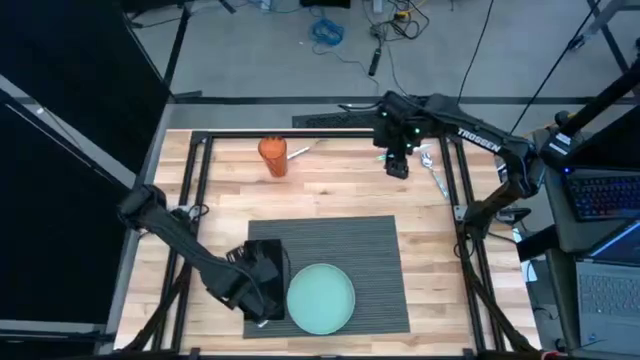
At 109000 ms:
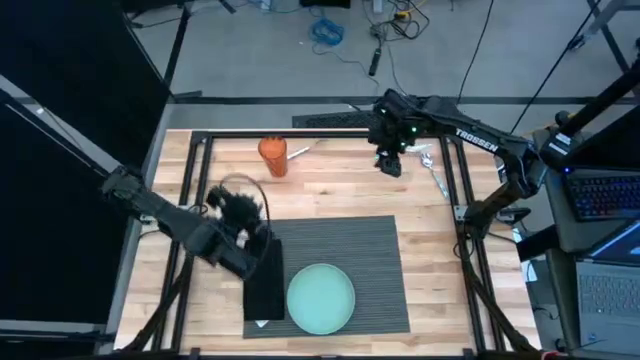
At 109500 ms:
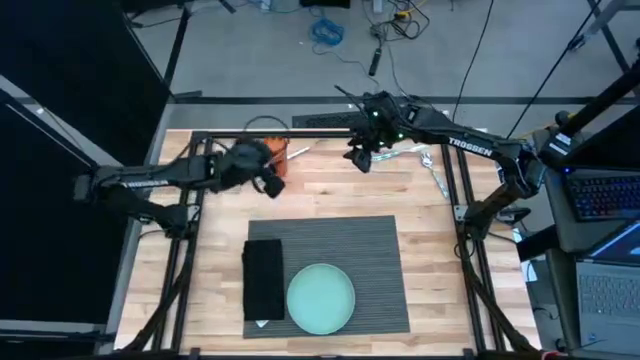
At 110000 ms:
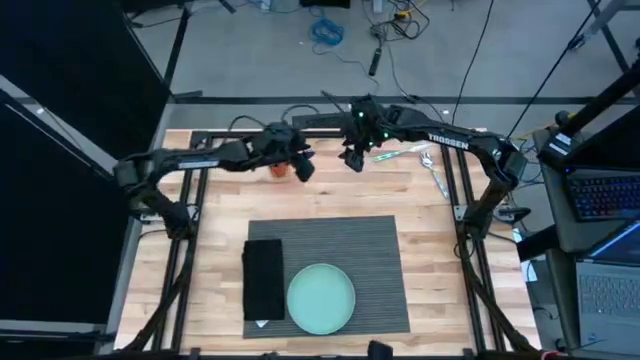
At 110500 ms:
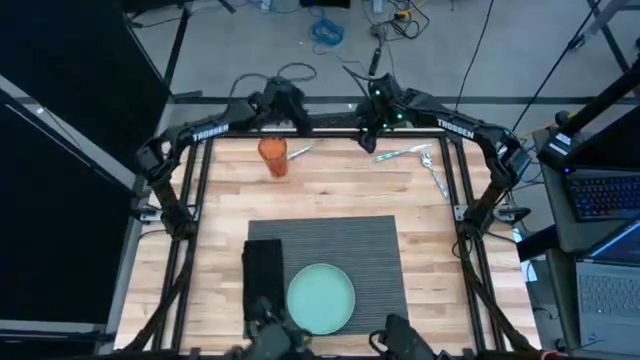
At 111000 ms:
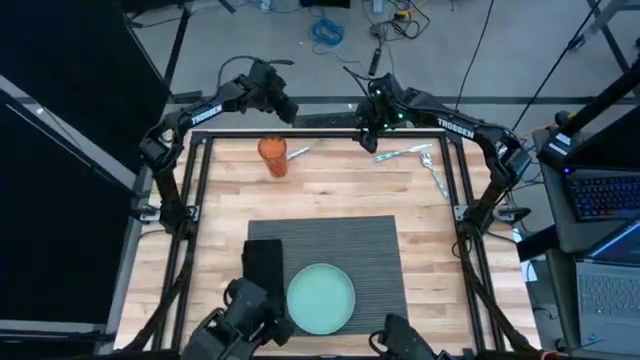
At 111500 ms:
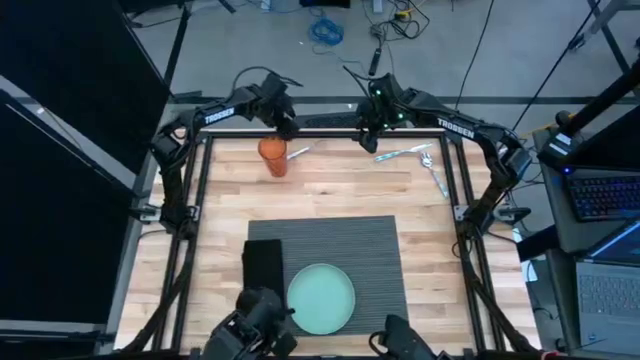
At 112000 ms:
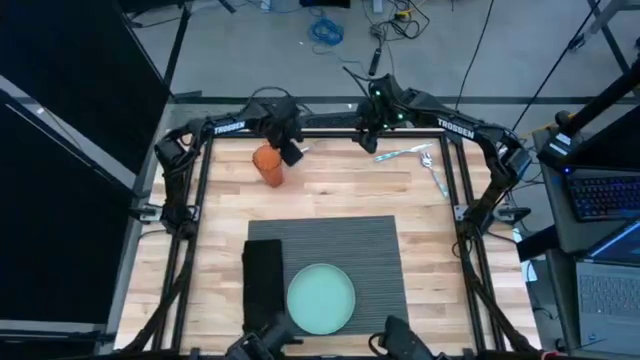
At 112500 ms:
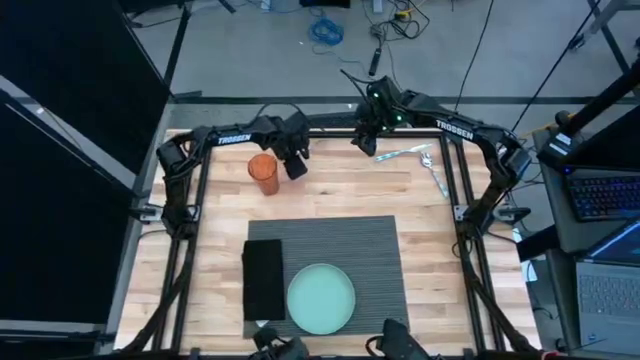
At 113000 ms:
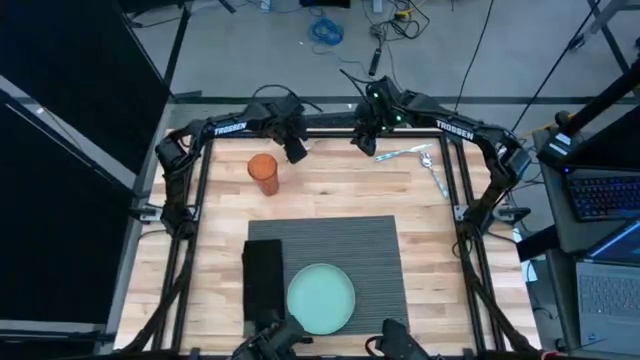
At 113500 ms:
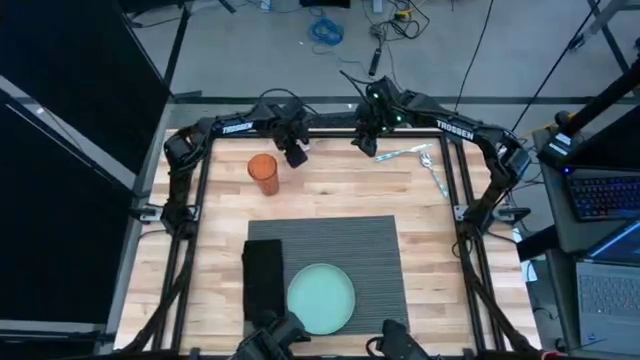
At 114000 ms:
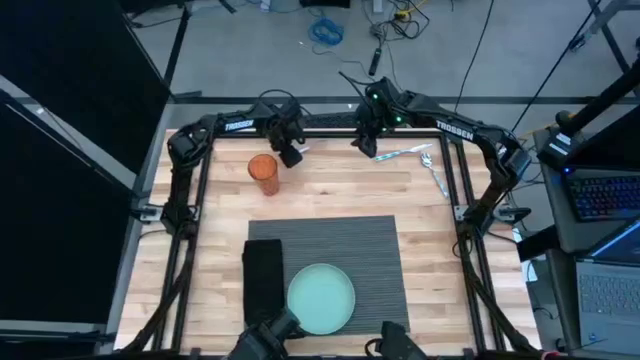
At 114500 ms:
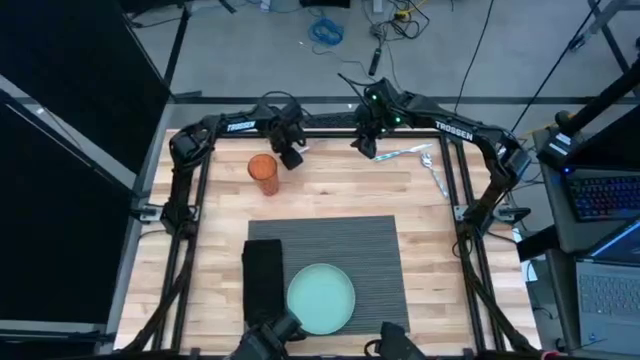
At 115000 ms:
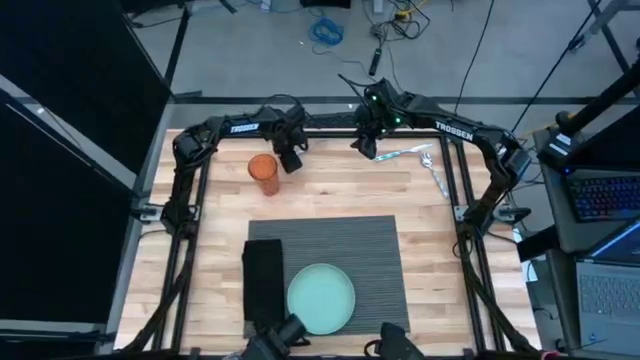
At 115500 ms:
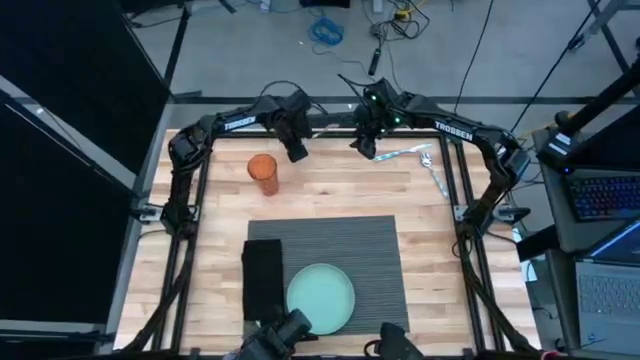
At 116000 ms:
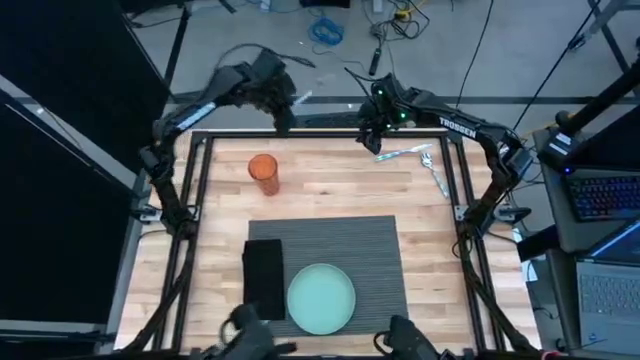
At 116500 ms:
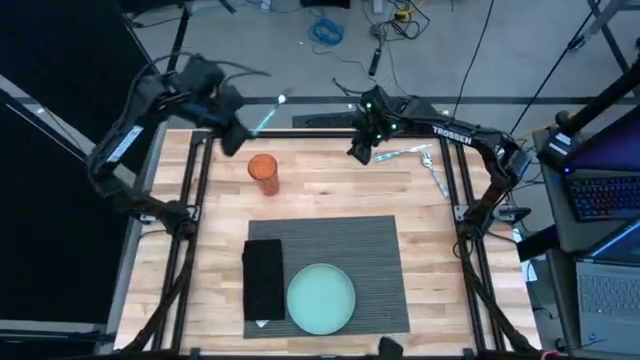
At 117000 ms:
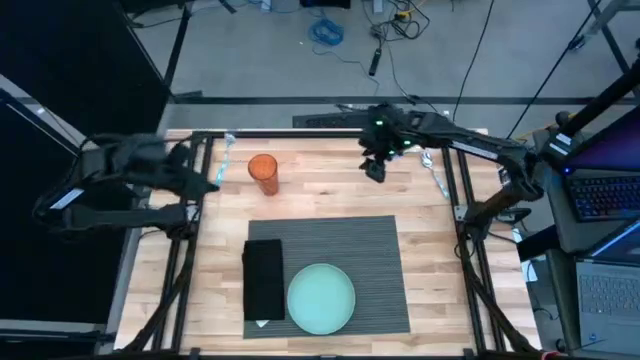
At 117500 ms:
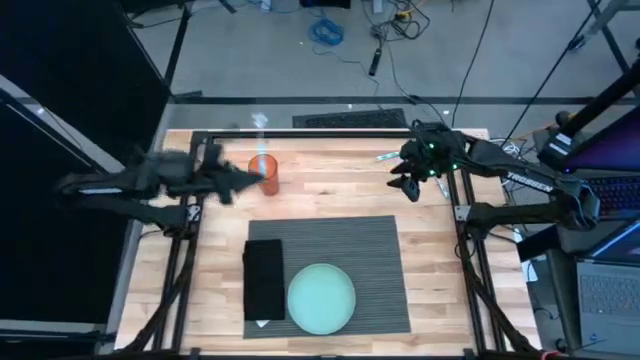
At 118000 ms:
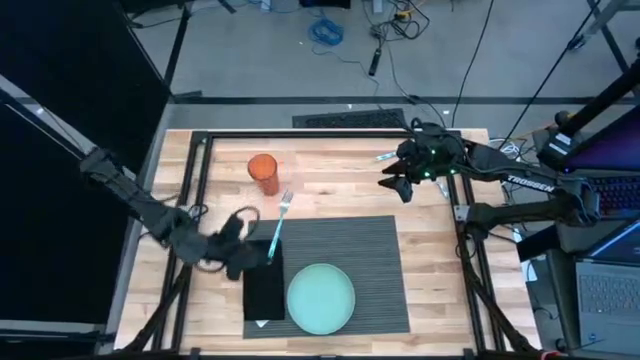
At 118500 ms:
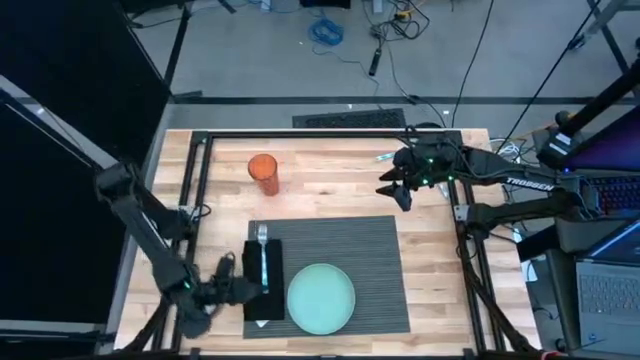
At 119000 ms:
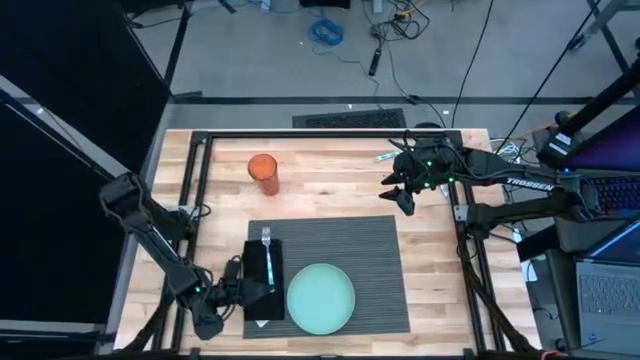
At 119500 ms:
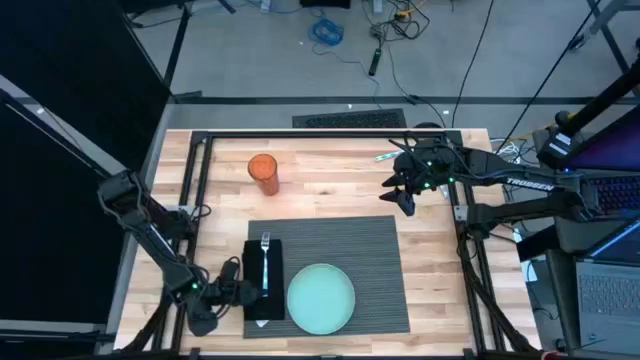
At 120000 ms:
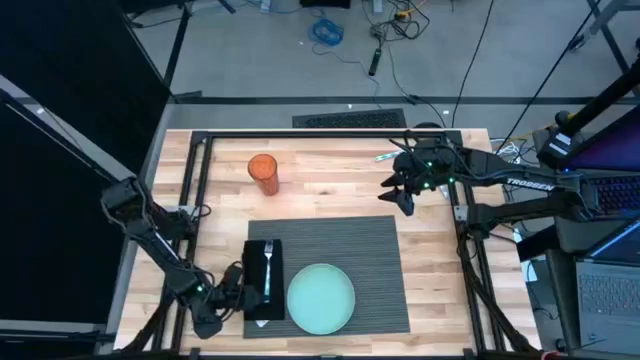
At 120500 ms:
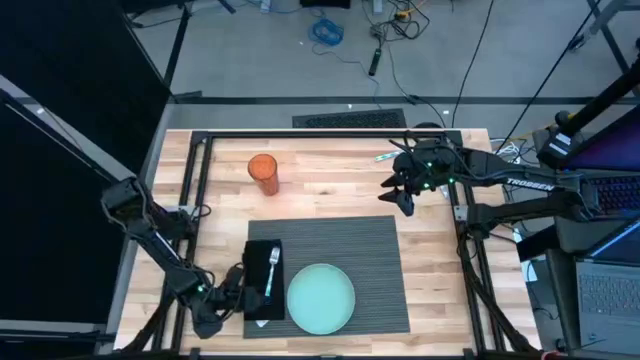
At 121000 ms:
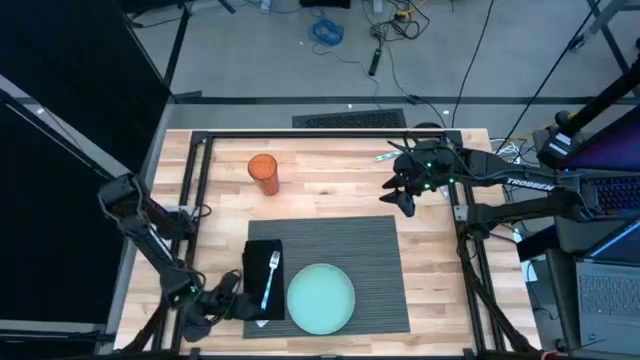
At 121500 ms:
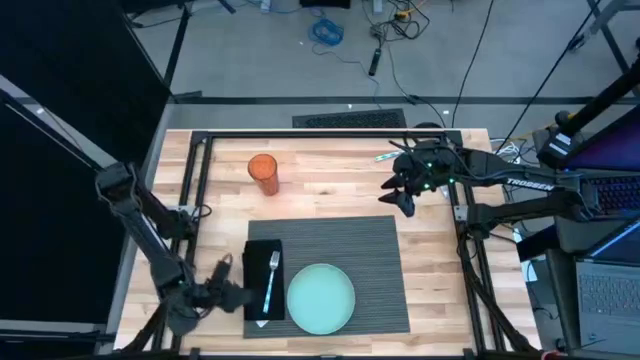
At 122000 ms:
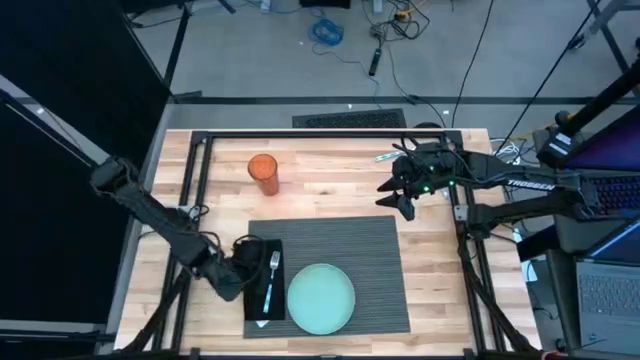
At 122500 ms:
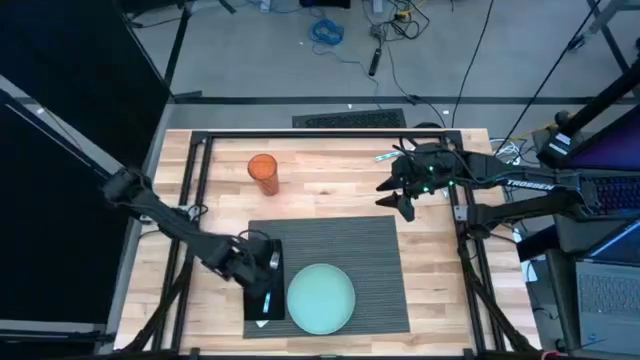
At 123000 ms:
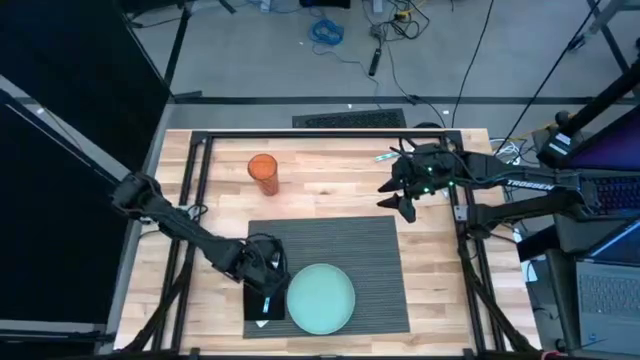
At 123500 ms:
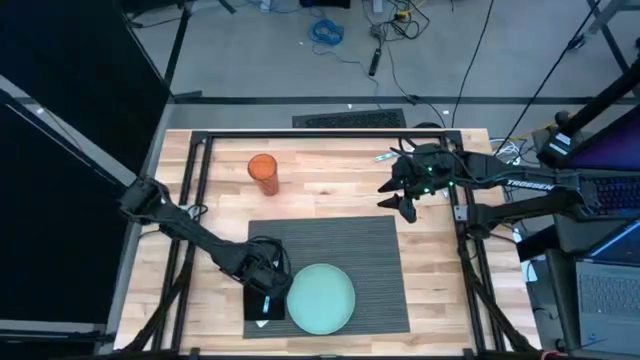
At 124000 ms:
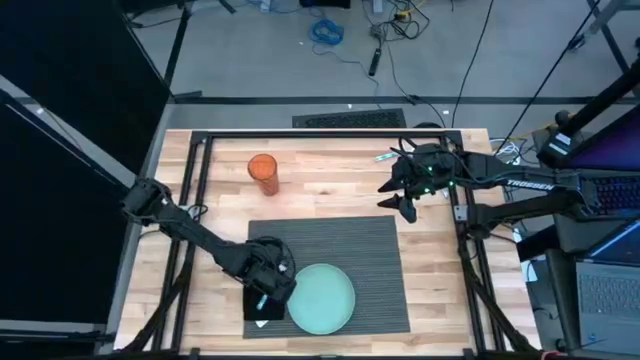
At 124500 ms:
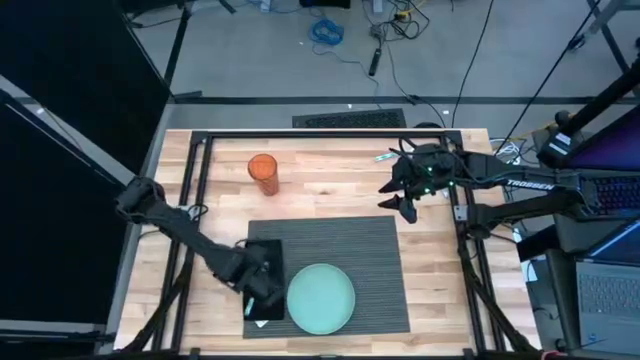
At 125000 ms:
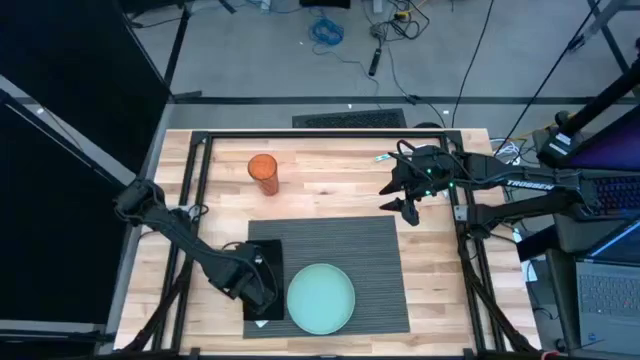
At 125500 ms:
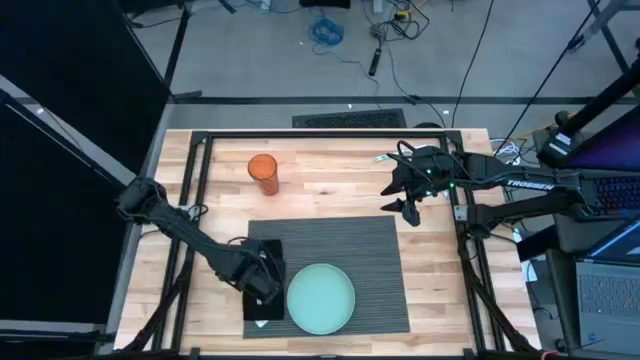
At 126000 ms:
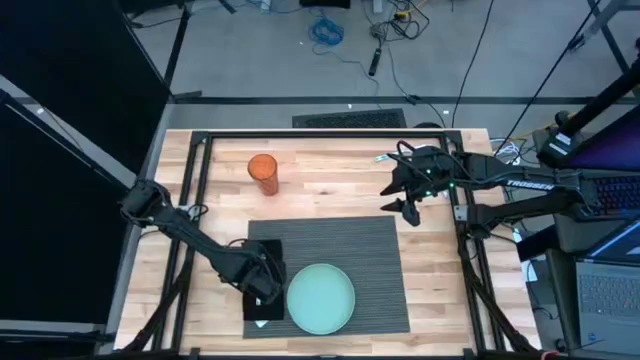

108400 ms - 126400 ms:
Task: Set table place
Put the white fork on the black table napkin

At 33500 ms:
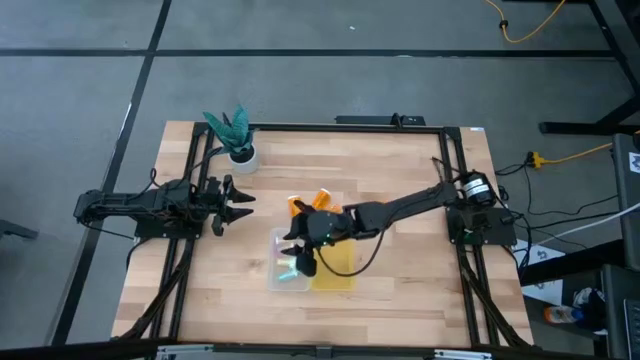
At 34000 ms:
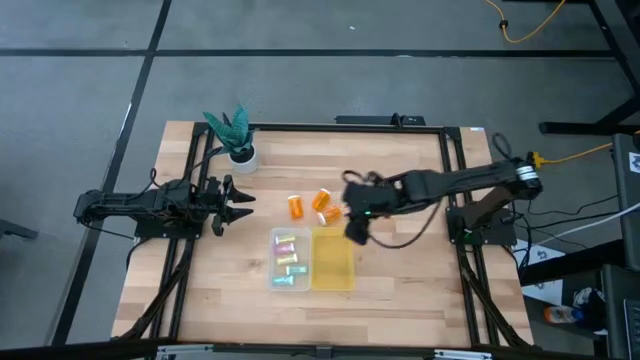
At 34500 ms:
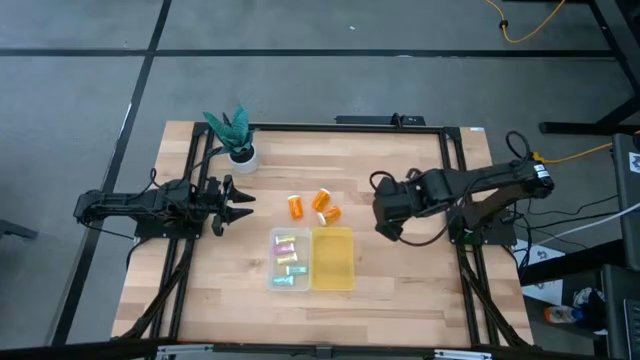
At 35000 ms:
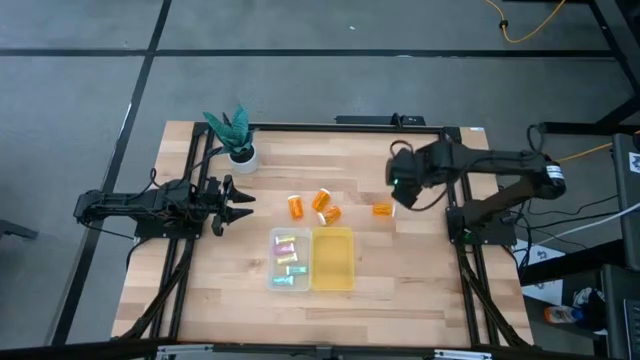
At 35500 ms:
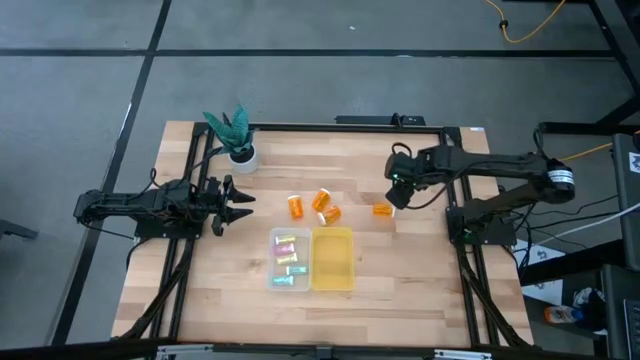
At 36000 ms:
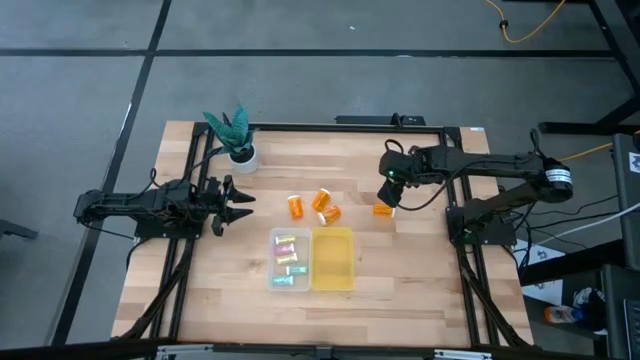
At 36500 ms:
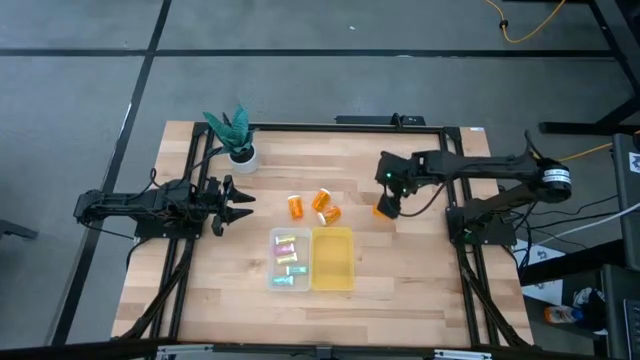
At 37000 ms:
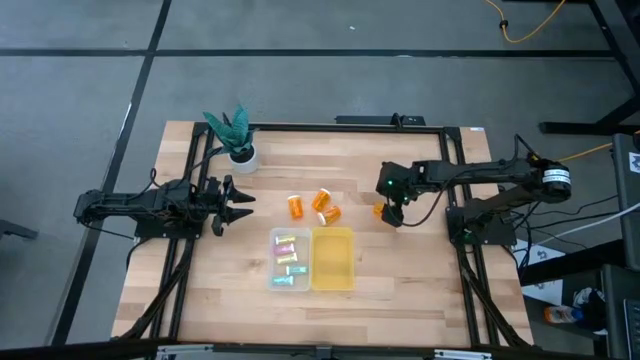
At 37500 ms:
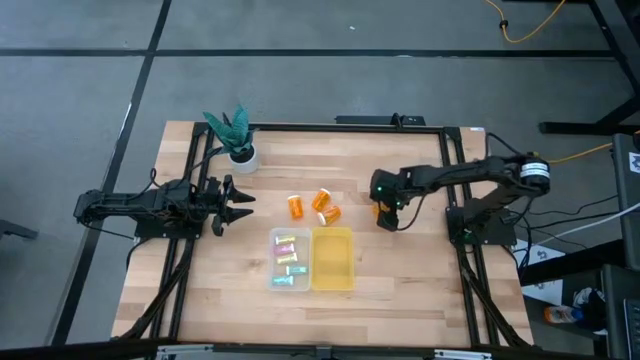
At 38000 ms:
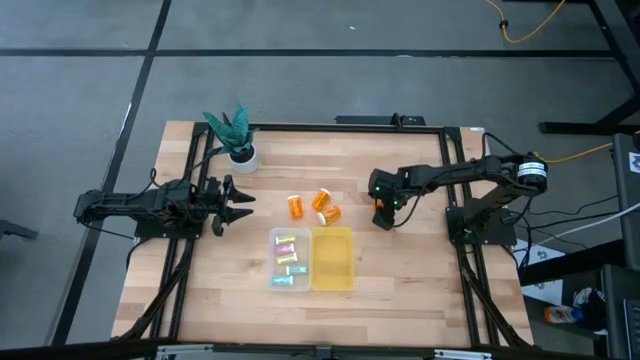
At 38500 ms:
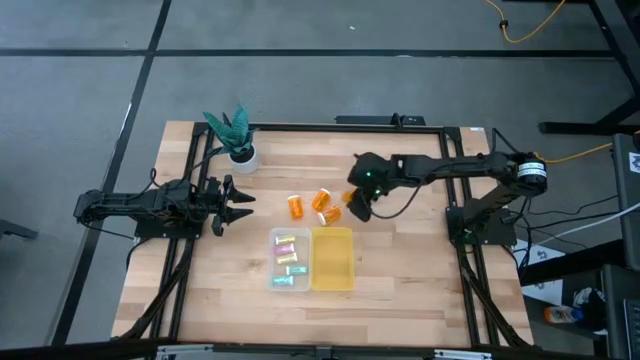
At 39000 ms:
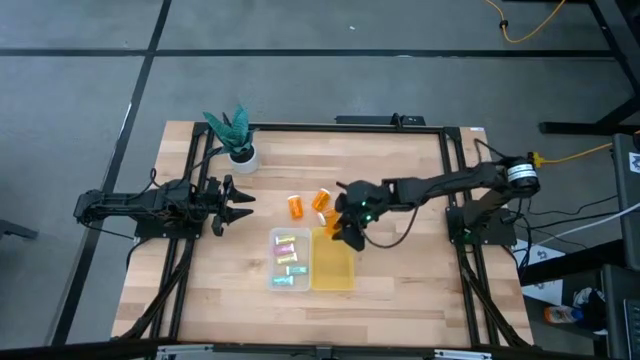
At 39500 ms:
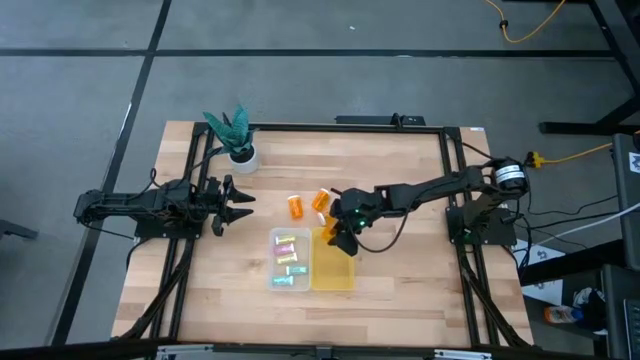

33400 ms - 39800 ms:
Task: Pick and place medicine bottles into bin by pill shape (circle, oval)
Put the orange capsule bottle into the yellow bin
